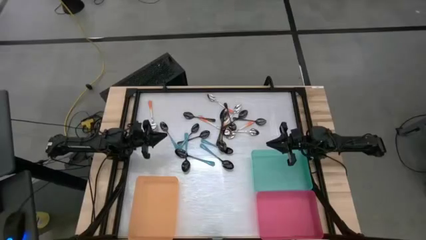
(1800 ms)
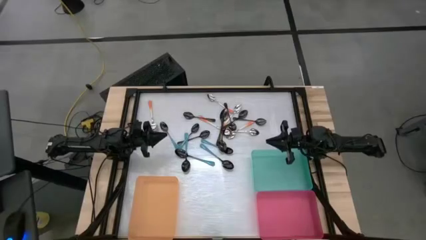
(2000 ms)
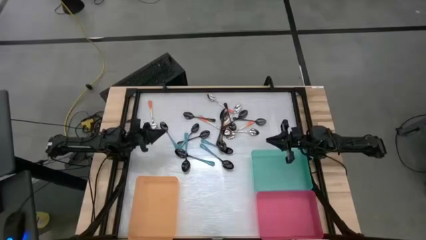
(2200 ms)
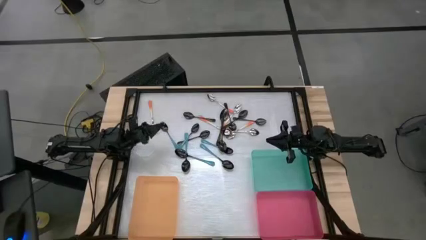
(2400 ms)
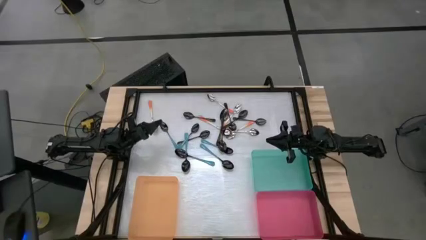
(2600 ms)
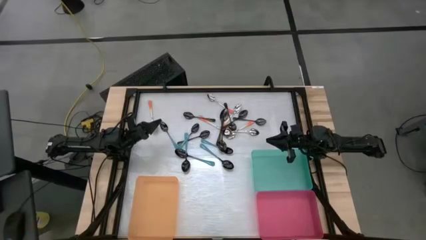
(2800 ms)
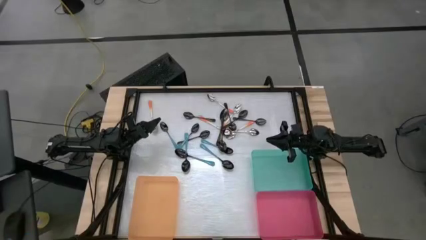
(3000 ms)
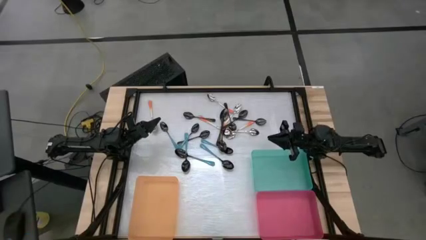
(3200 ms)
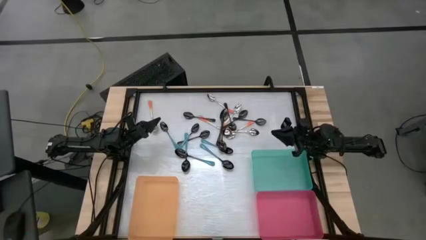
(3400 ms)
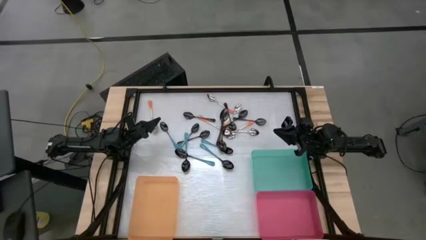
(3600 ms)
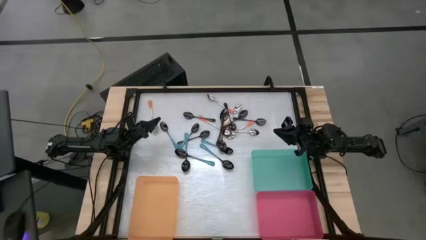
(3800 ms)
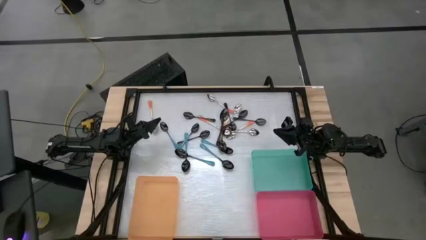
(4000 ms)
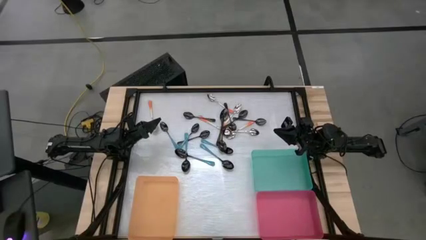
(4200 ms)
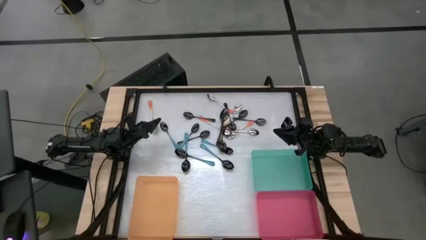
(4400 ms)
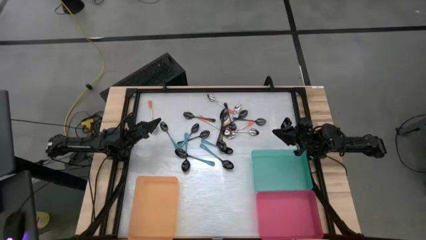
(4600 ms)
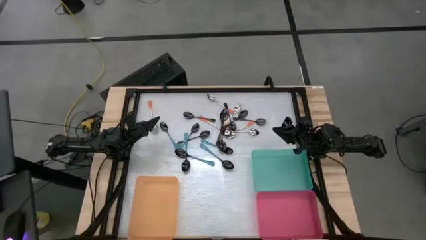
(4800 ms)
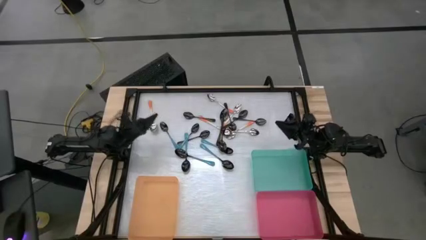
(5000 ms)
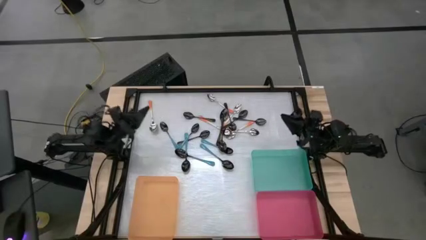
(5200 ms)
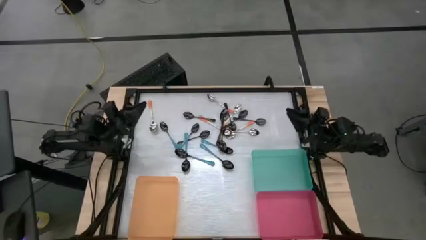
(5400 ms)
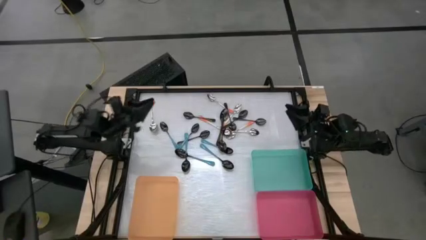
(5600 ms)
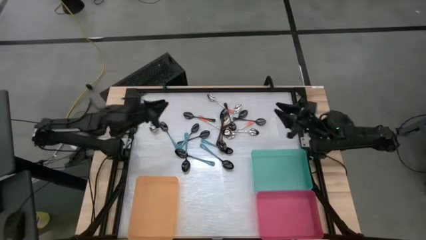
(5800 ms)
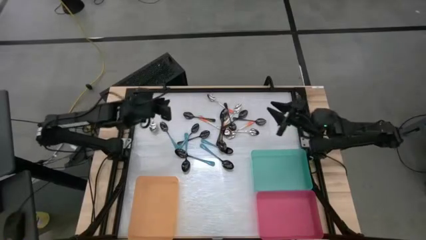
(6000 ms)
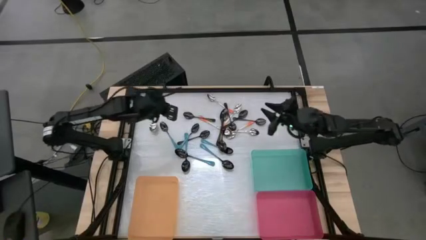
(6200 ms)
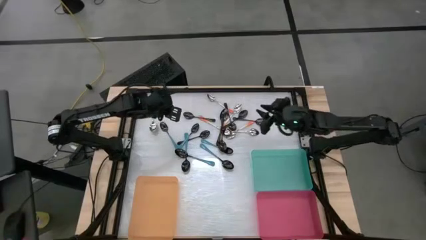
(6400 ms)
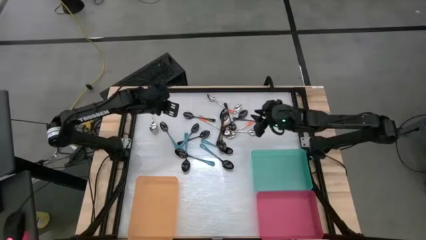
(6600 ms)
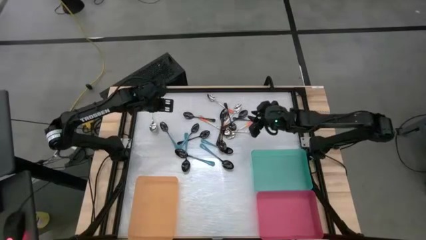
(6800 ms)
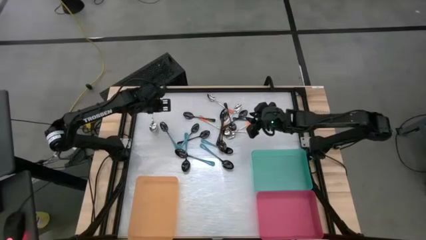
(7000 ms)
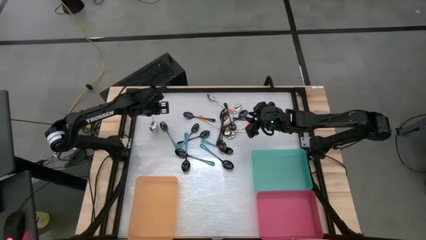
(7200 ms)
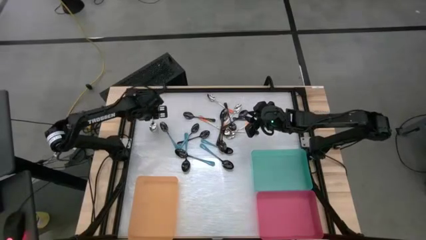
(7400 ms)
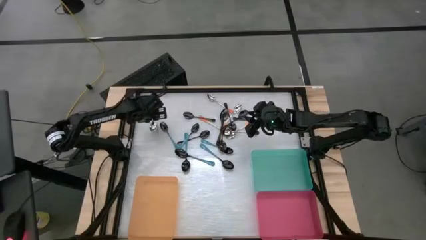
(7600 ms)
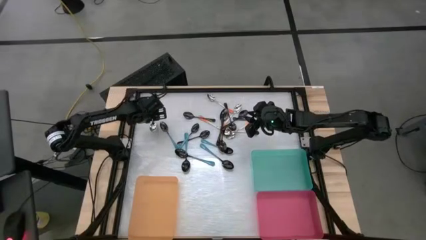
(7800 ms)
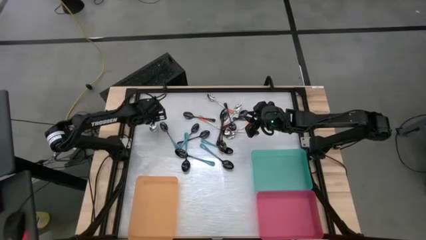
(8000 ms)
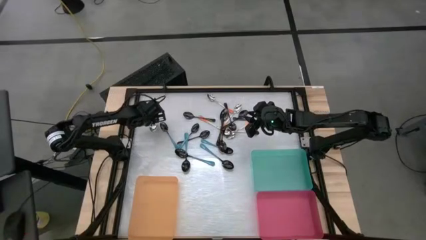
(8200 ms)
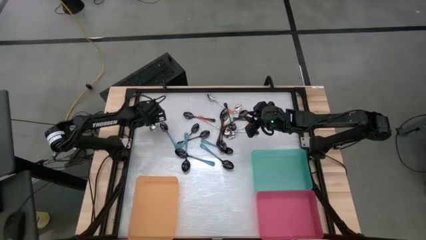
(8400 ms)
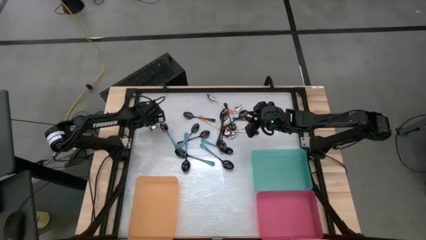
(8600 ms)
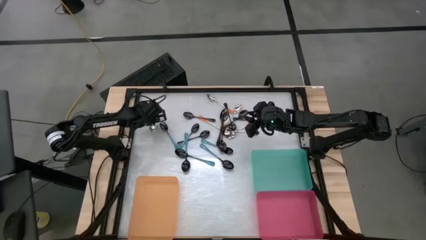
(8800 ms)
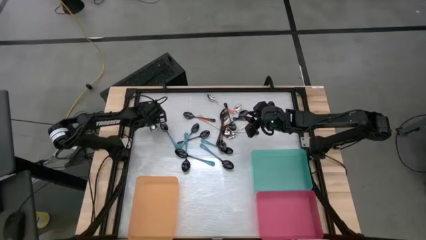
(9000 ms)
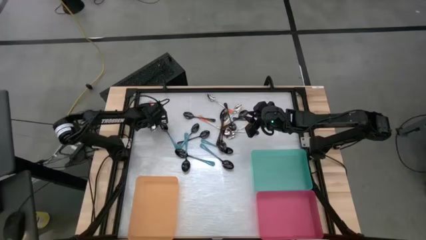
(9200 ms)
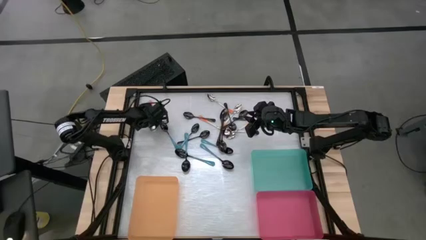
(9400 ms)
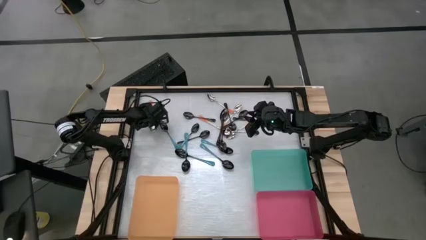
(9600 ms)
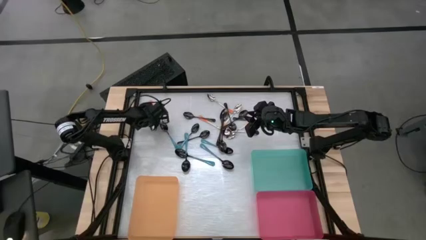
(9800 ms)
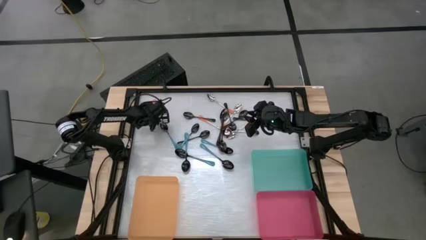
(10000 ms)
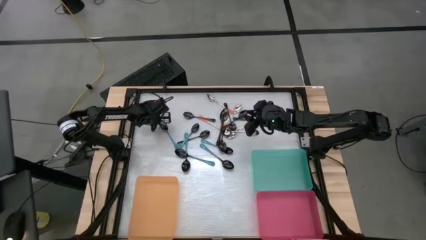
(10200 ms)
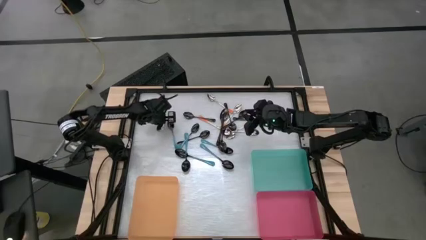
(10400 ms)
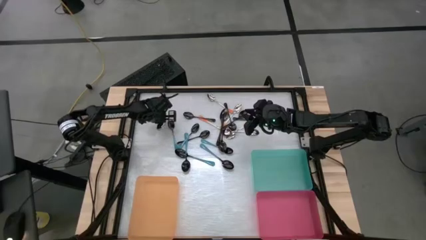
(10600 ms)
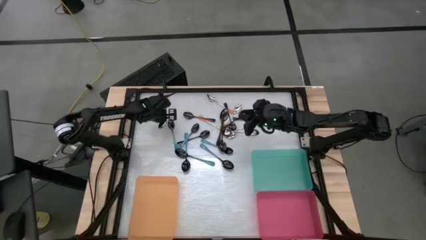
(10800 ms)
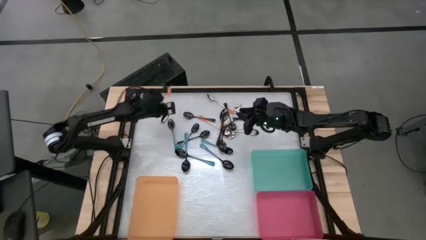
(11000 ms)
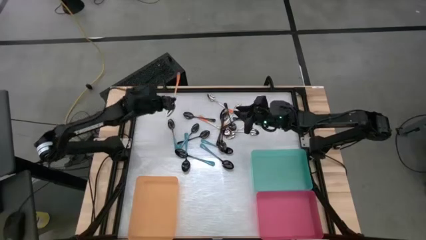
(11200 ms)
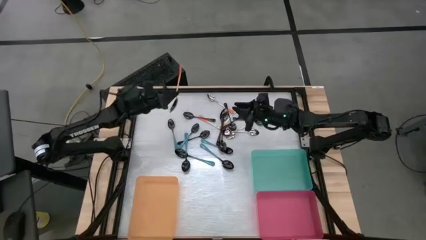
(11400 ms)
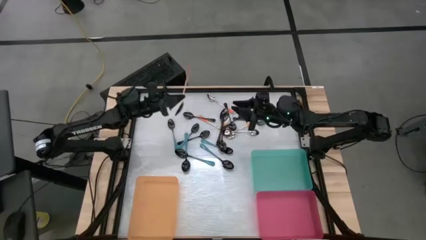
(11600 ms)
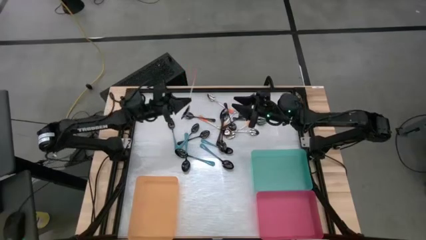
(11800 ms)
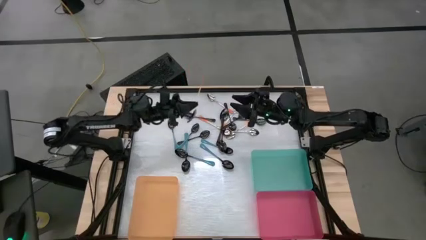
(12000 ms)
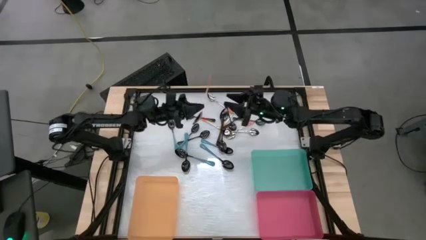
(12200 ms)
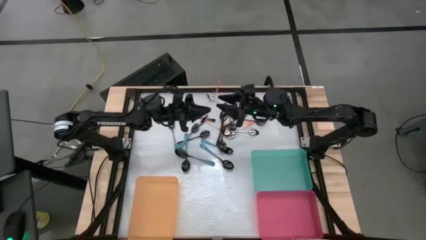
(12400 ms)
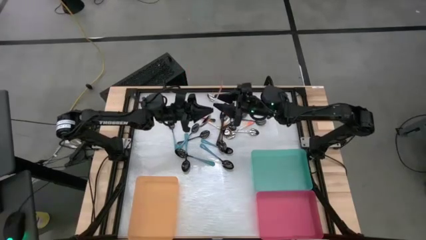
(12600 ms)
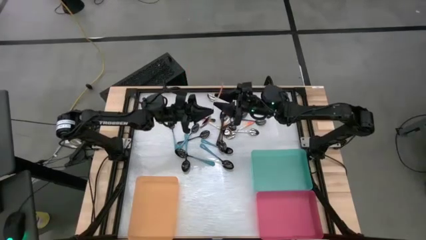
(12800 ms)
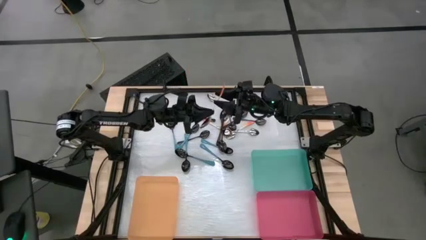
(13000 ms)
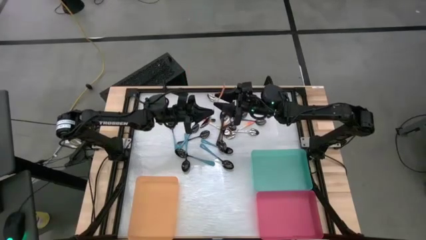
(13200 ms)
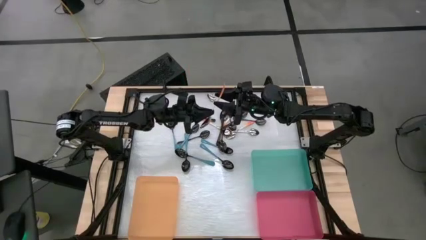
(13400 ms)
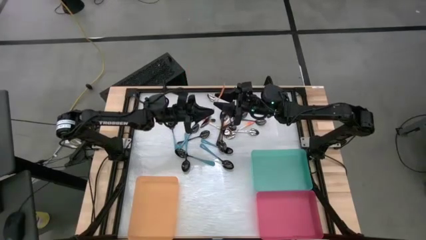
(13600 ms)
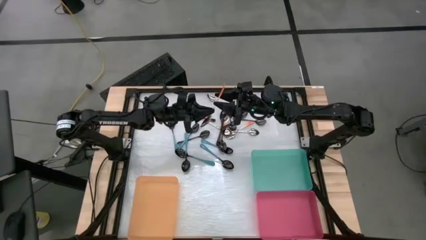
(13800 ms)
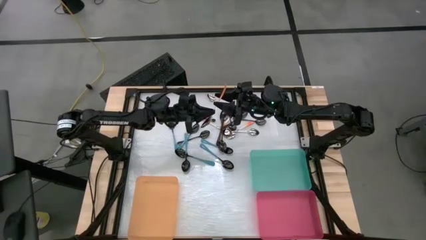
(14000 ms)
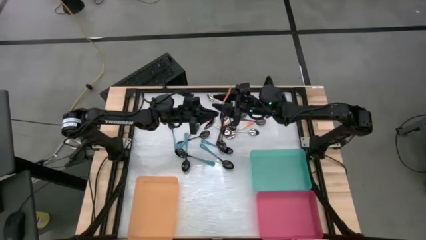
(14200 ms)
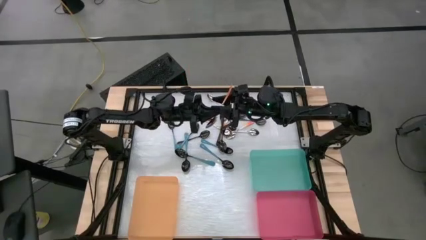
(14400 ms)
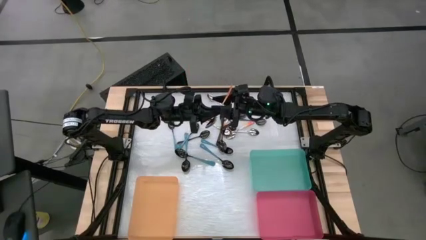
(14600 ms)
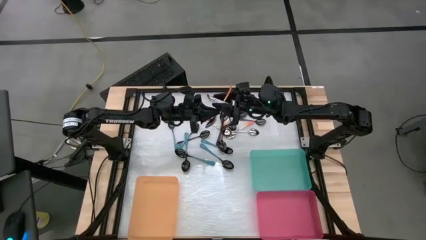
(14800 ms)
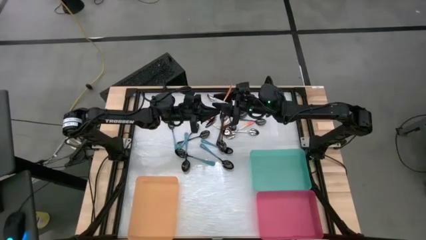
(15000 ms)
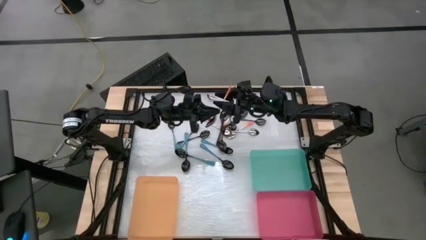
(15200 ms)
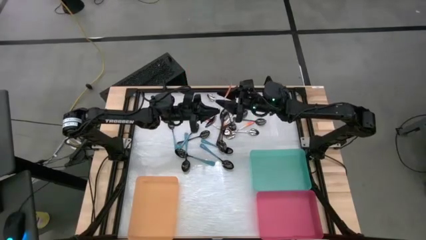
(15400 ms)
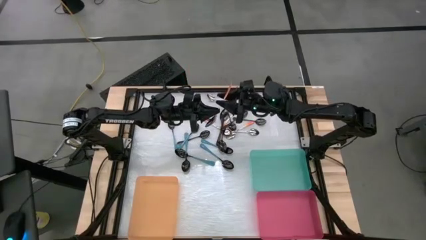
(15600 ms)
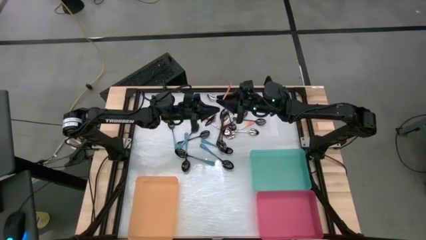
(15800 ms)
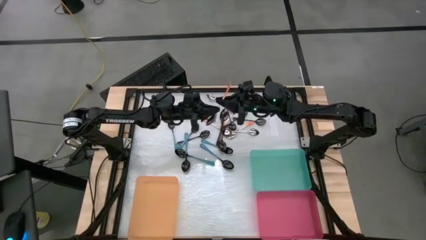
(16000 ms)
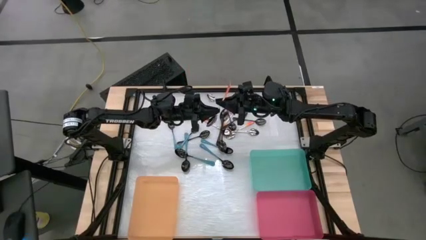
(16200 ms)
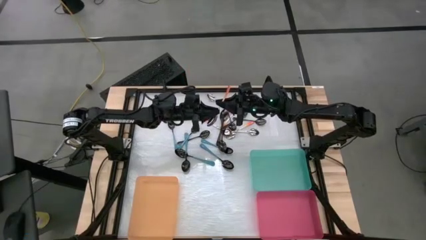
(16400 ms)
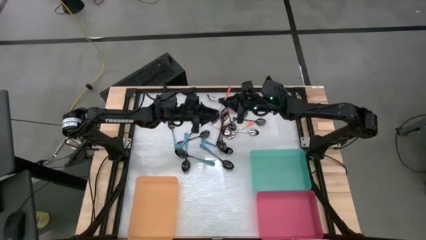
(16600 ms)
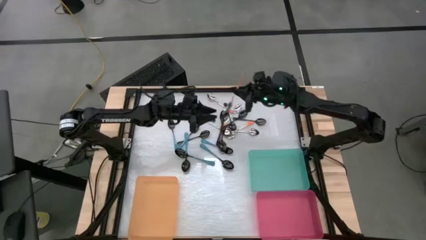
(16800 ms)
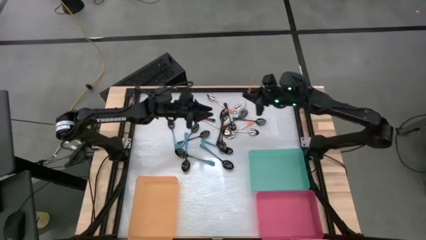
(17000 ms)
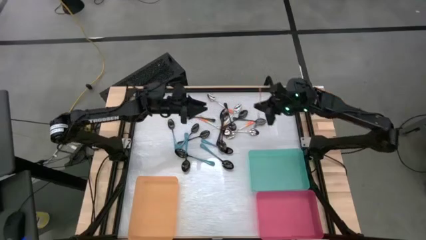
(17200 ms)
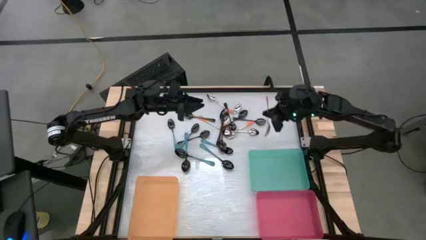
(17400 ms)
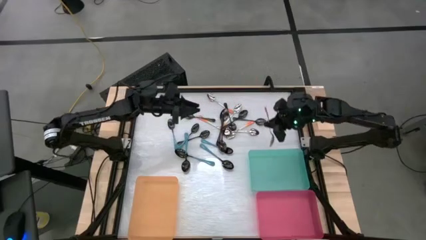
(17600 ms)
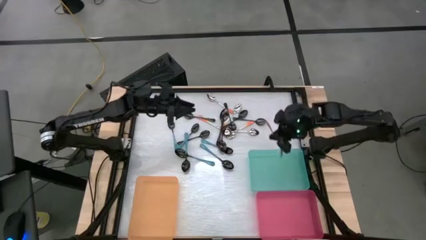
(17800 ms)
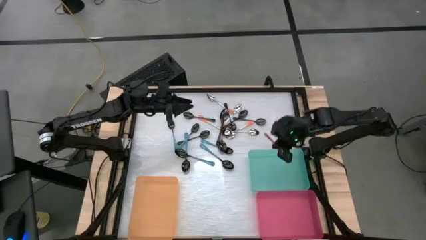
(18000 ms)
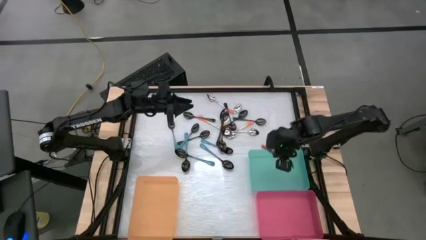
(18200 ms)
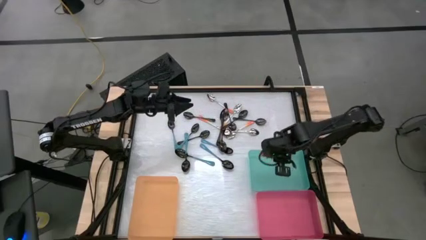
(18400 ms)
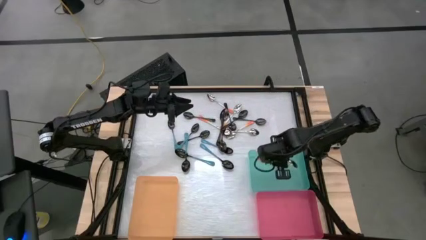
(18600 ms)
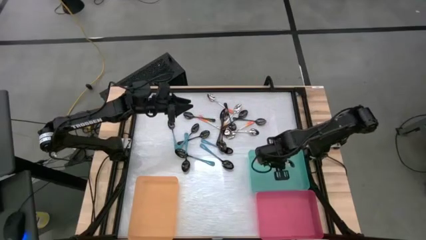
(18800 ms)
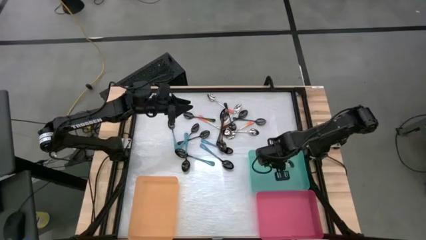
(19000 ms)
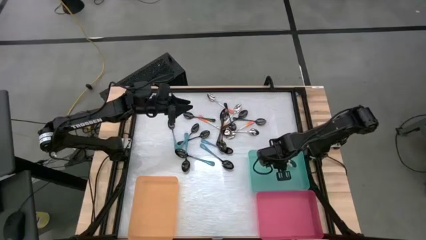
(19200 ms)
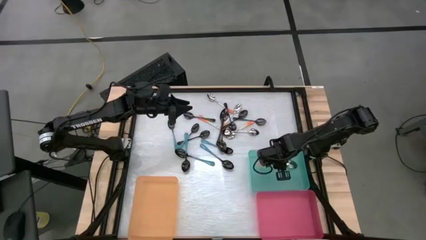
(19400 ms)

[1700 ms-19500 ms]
Task: Sort silverware by color (type)
Put the orange spoon into the blue bin
